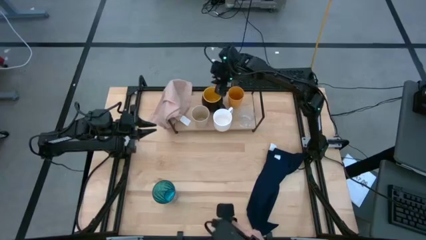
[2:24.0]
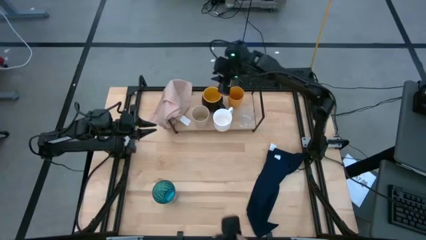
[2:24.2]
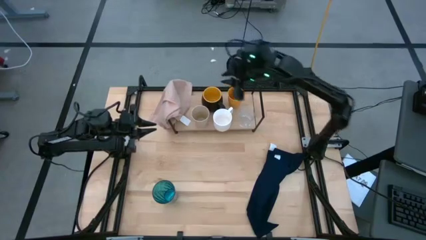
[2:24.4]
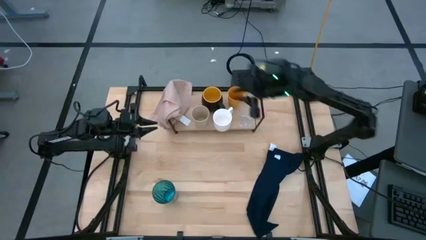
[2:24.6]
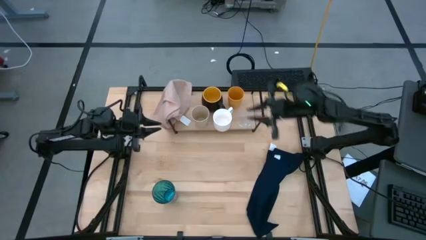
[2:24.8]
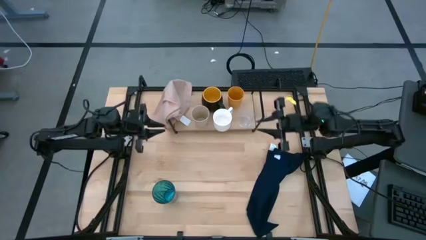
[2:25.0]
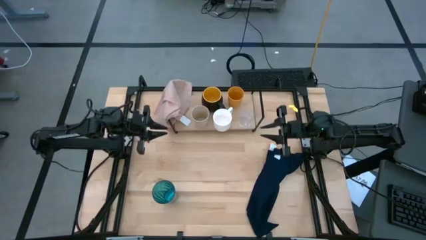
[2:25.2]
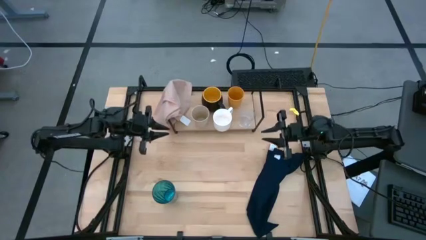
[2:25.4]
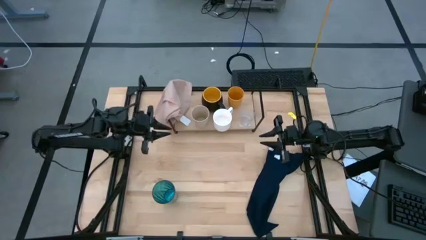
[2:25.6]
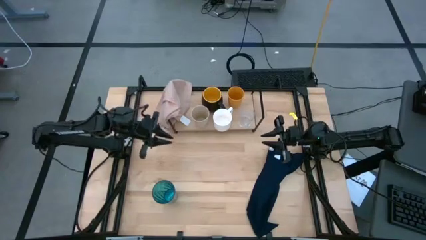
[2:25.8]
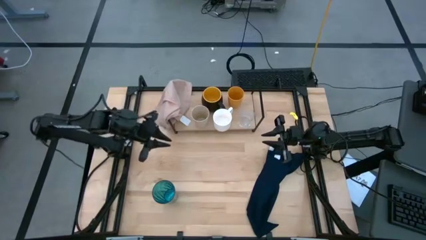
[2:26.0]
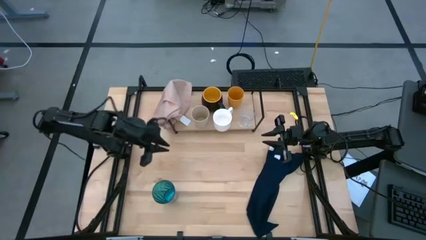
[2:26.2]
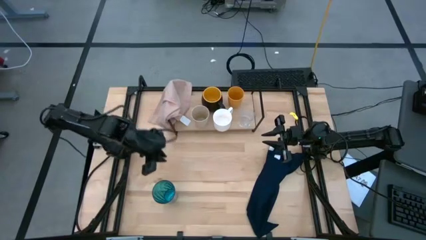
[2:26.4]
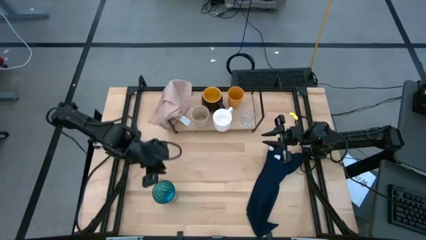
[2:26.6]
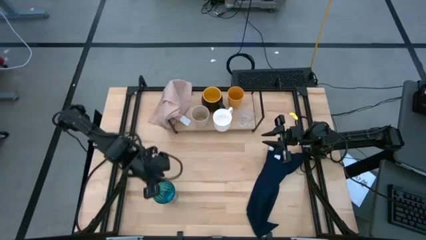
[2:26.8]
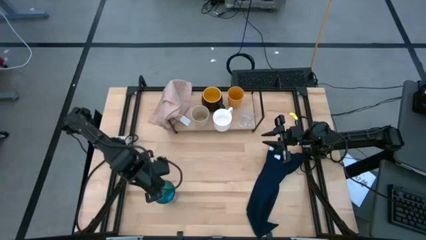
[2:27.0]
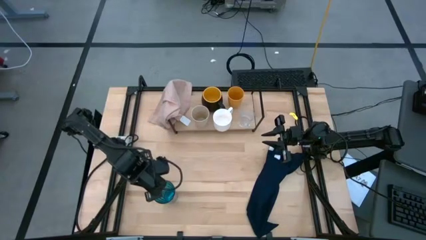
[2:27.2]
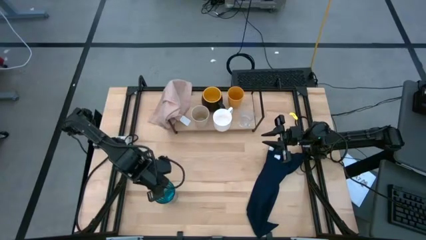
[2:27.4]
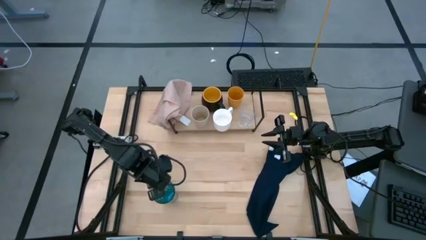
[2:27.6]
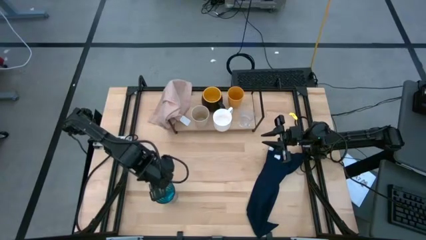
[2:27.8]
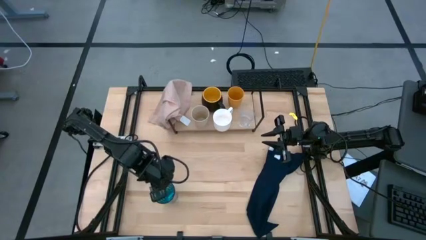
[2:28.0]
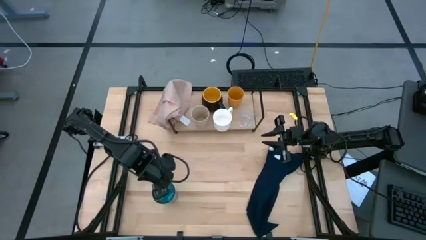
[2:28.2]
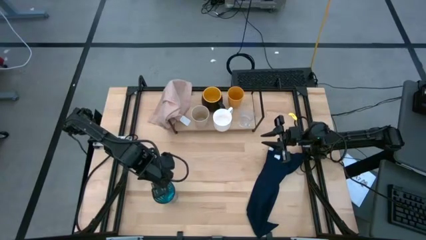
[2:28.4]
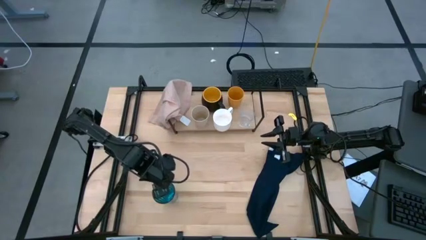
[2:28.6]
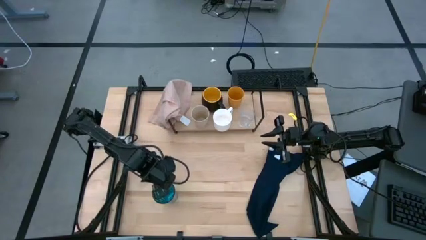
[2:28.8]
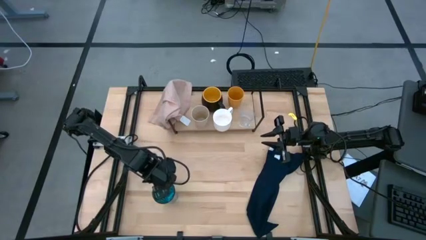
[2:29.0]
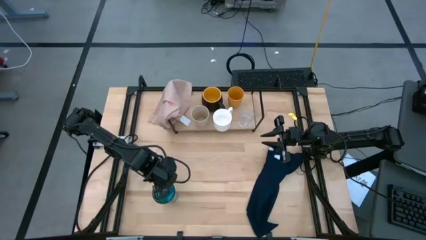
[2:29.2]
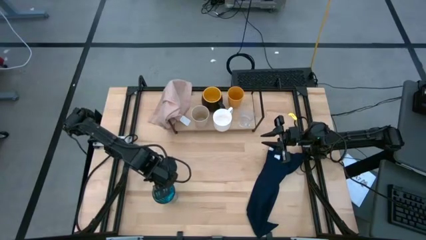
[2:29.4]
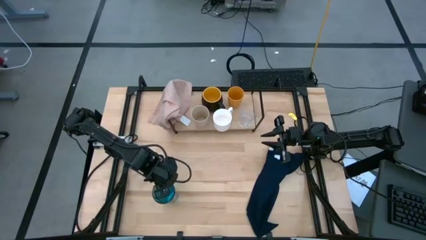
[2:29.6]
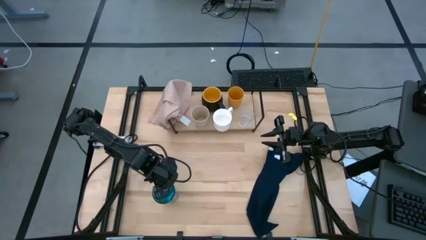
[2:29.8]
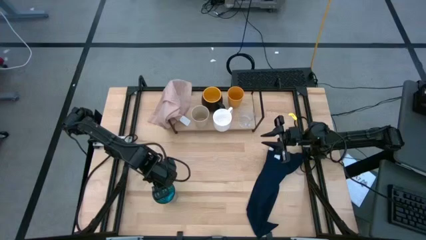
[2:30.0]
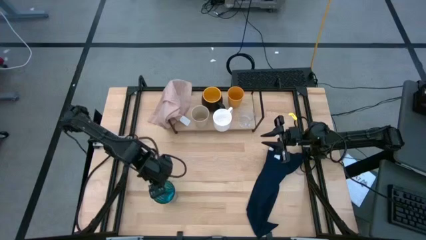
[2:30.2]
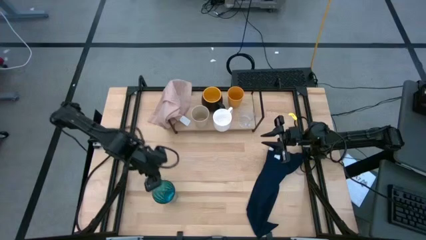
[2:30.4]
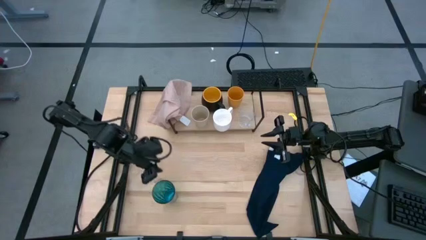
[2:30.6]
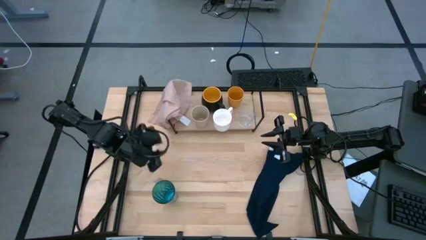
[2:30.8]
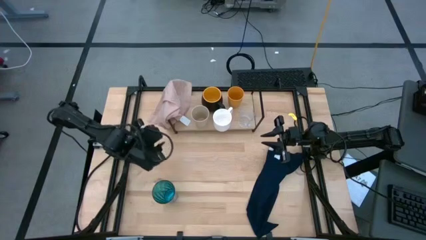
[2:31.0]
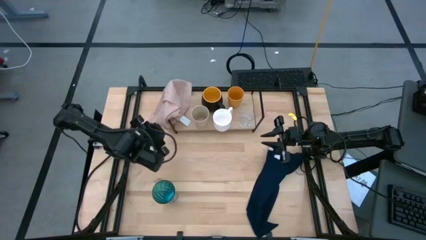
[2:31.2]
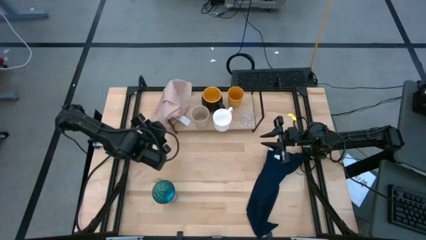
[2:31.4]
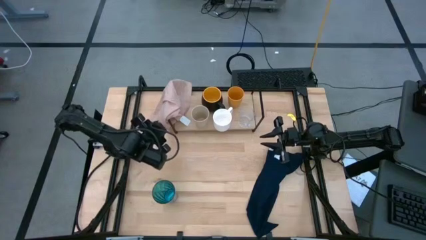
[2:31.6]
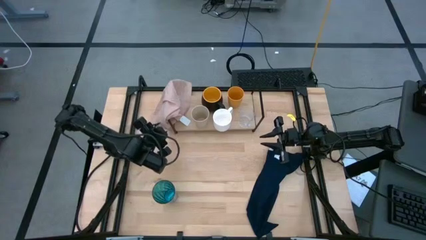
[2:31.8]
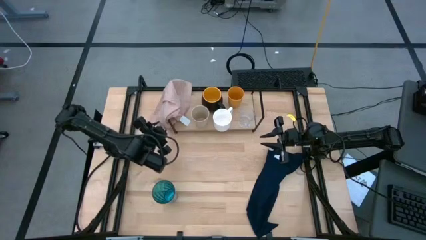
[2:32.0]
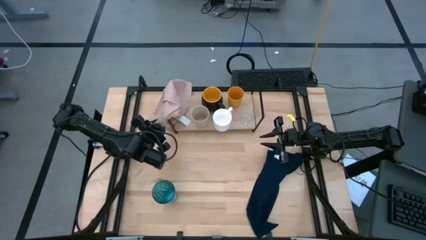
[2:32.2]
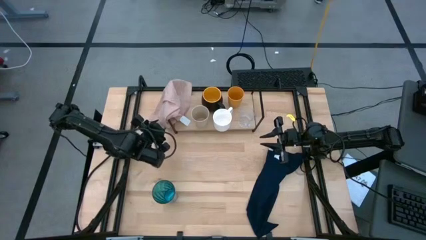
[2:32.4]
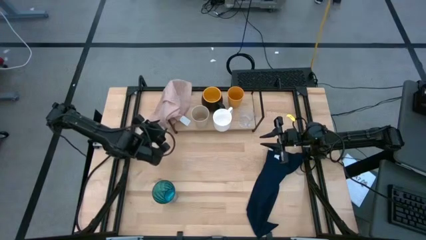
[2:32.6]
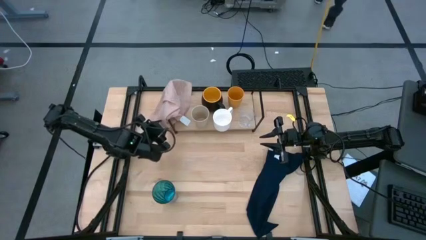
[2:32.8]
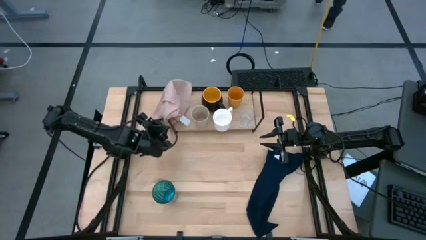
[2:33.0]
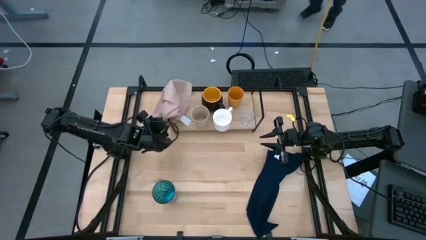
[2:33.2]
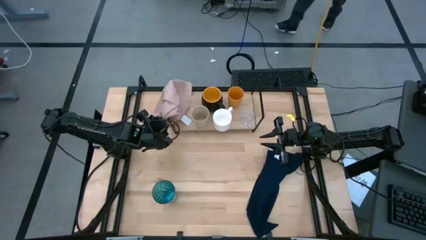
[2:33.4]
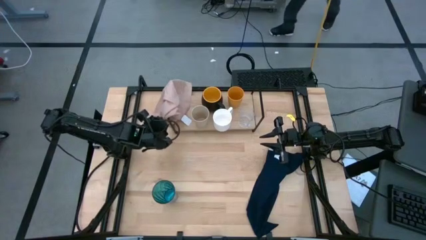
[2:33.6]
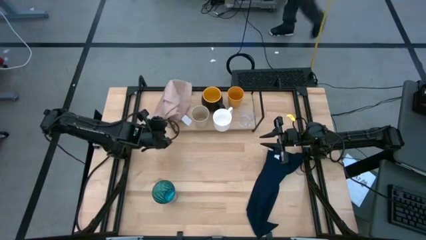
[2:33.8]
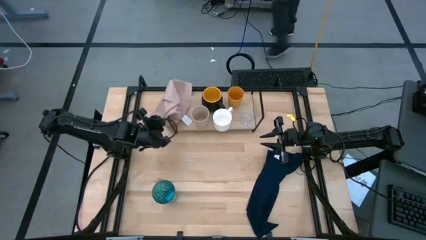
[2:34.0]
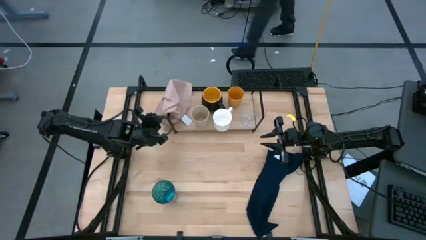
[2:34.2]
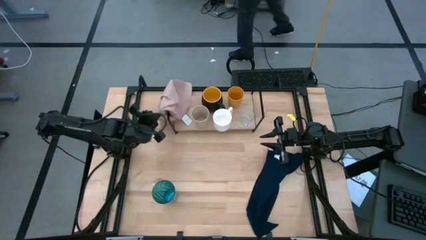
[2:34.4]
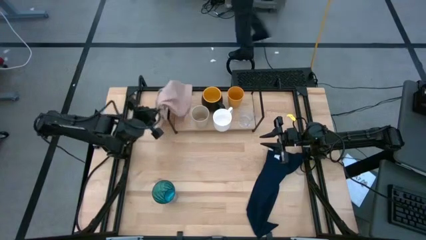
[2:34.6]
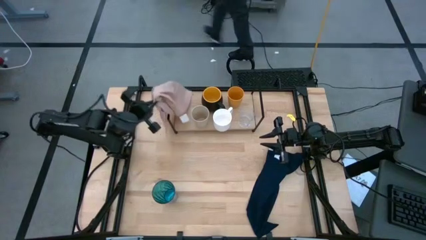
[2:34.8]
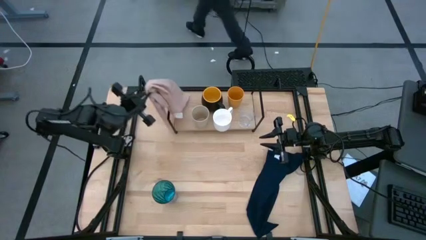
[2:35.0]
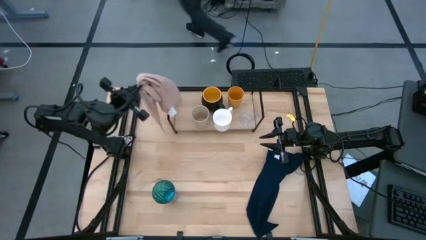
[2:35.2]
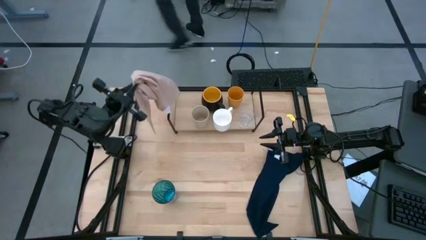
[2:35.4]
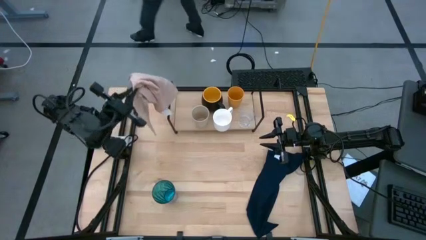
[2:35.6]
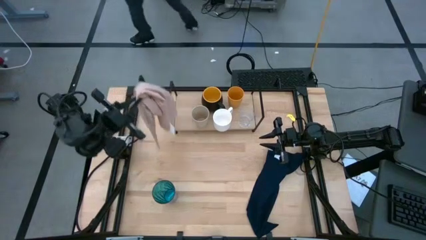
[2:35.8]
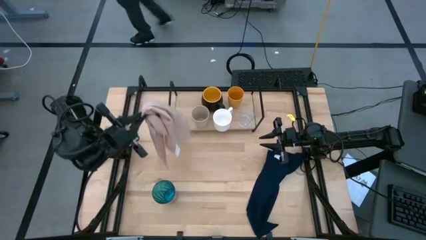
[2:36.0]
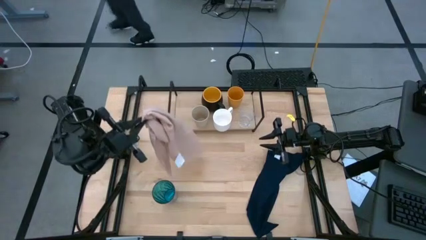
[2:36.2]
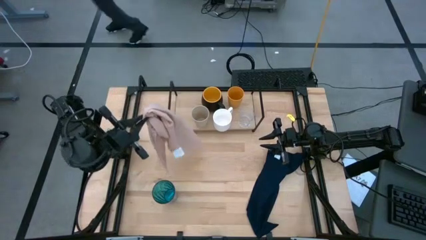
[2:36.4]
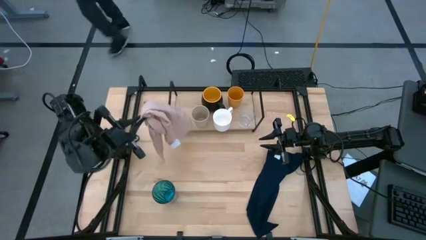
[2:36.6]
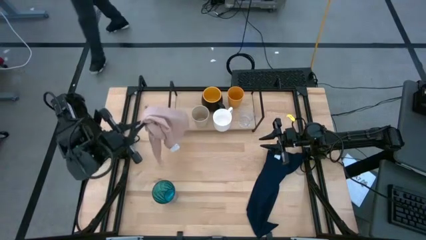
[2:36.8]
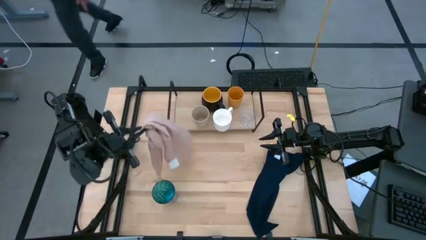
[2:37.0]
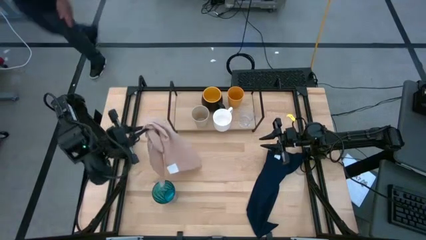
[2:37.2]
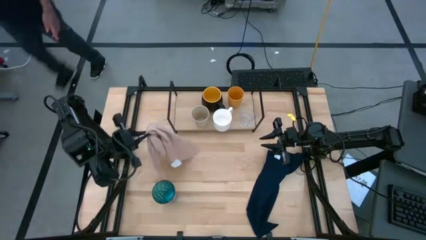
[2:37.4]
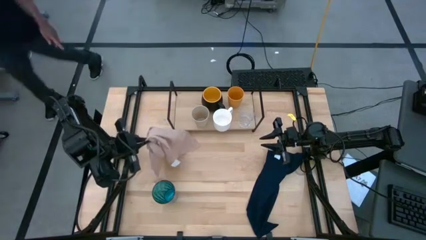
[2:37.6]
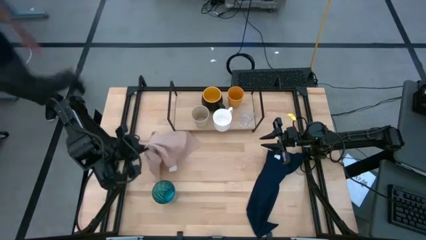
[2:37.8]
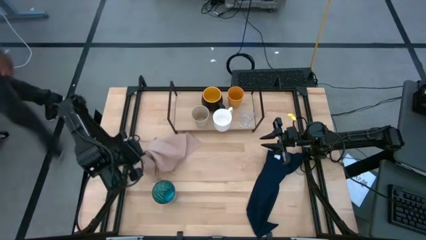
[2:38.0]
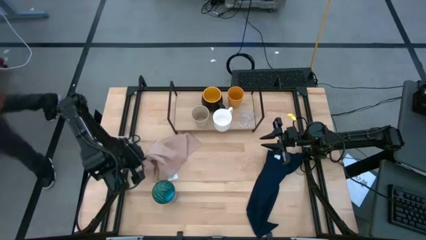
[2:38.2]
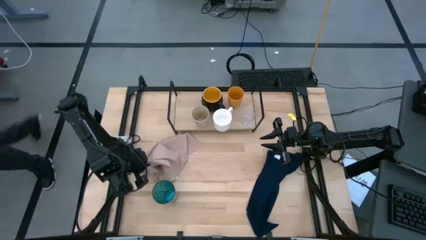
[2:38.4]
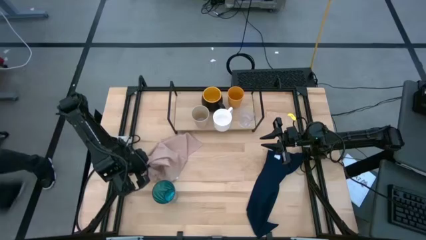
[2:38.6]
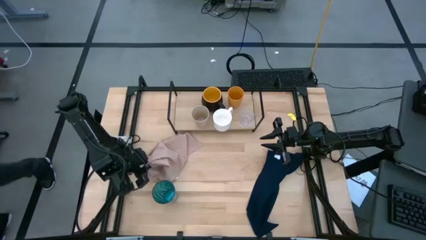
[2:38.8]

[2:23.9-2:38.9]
Task: Stack small to large cups/mugs on shelf
Remove the light pink table napkin from the shelf
